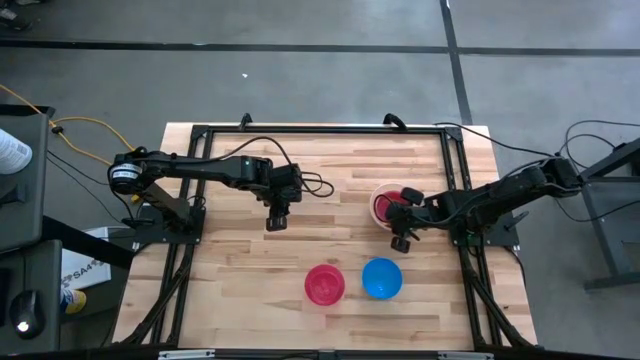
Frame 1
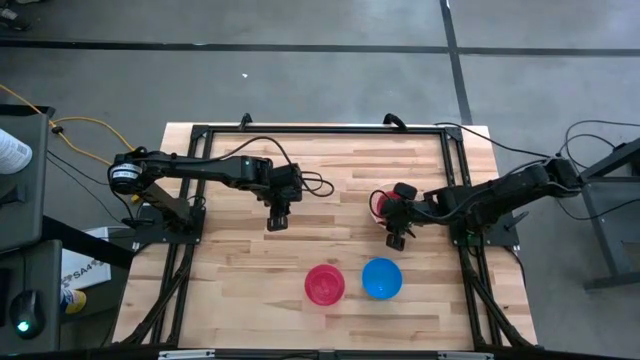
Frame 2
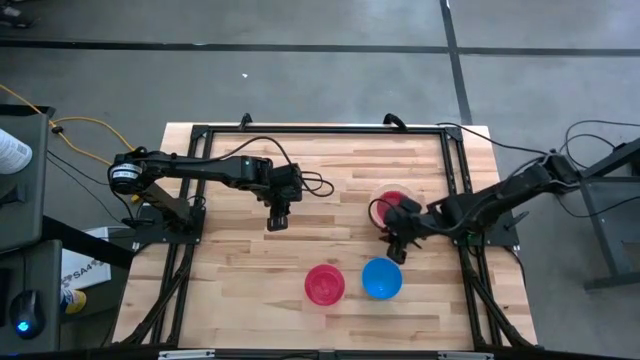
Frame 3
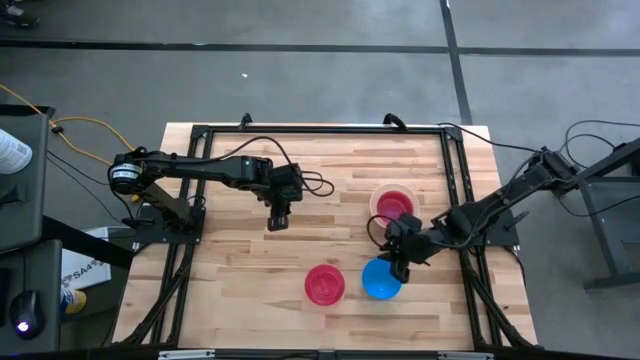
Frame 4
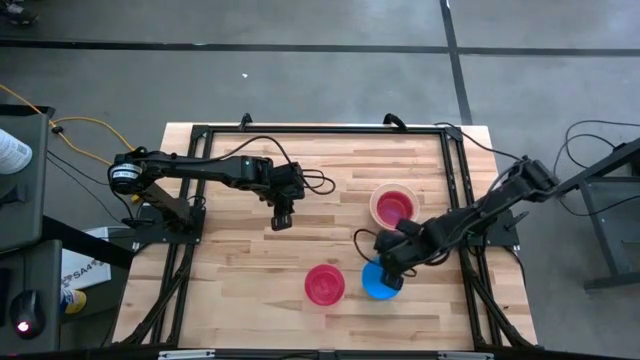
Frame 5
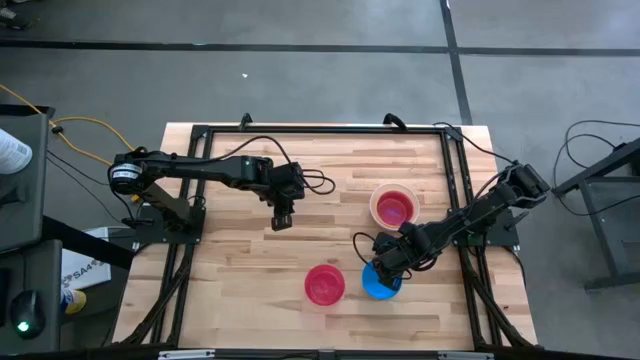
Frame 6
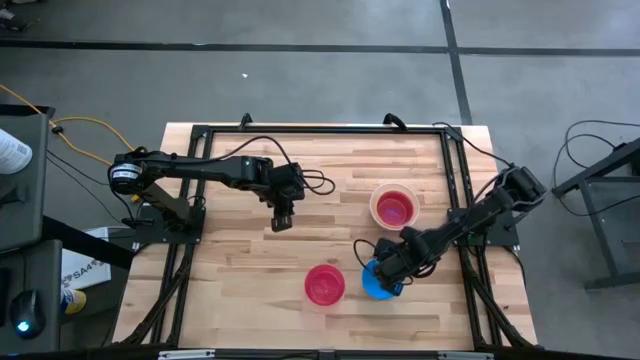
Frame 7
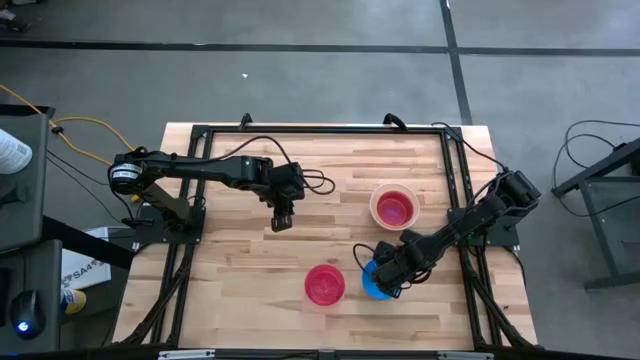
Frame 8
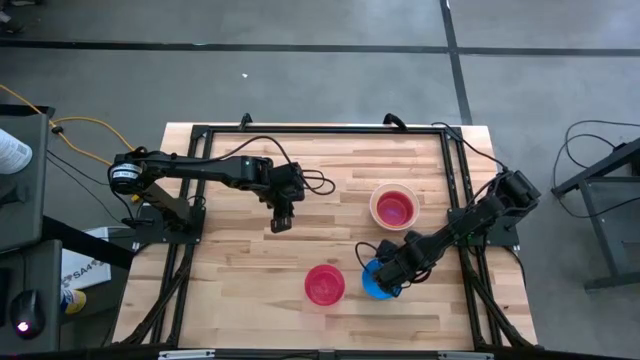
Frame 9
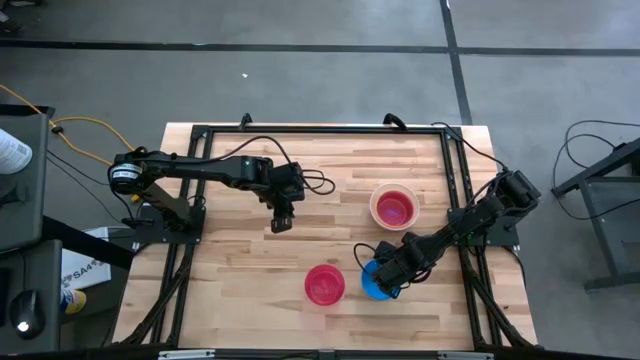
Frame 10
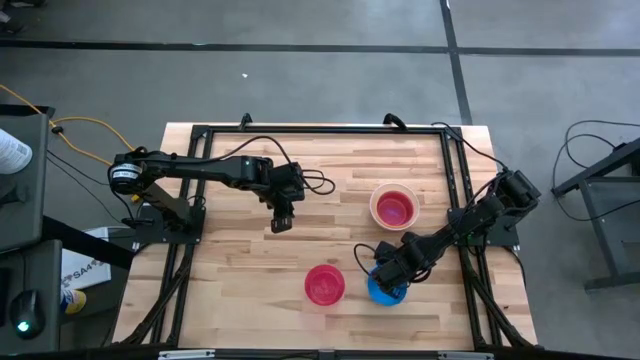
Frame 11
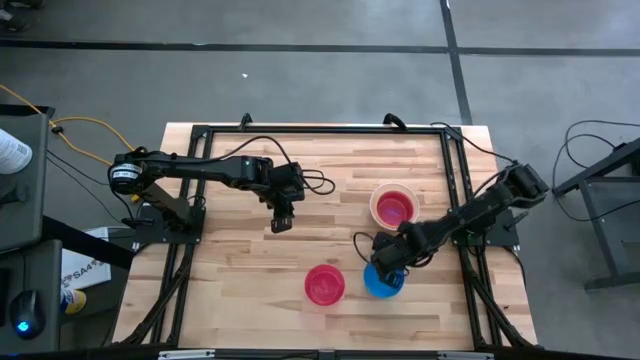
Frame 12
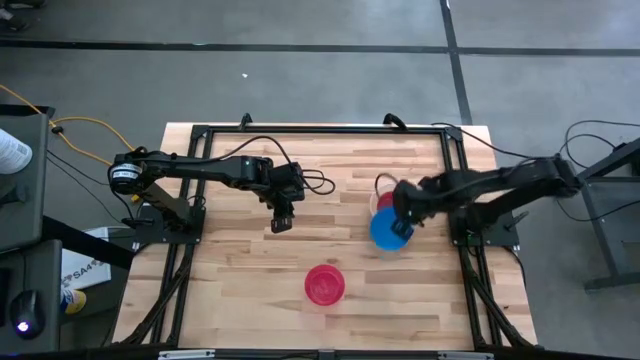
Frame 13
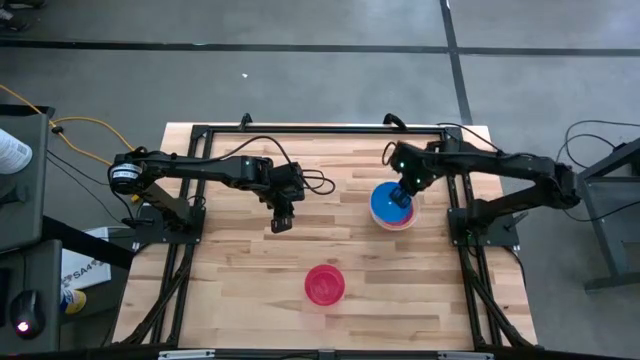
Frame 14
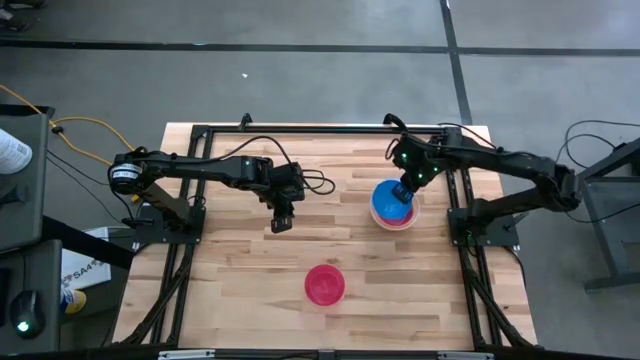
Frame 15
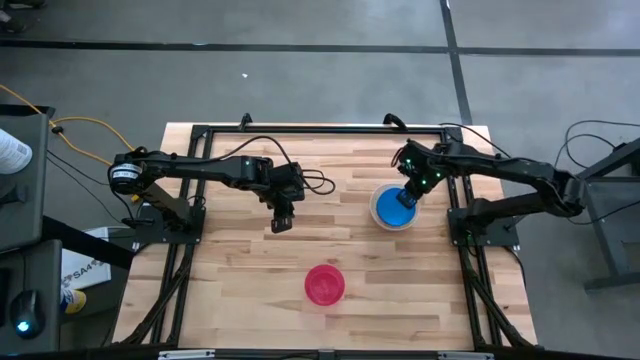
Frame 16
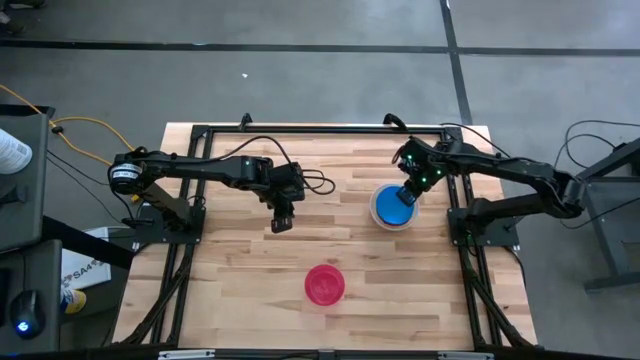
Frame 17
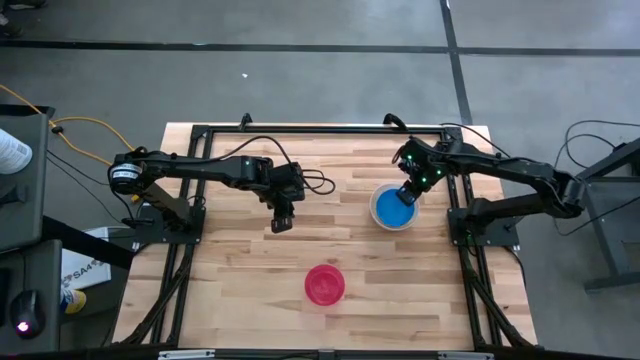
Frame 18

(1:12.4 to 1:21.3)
Stack the blue bowl on top of the violet bowl

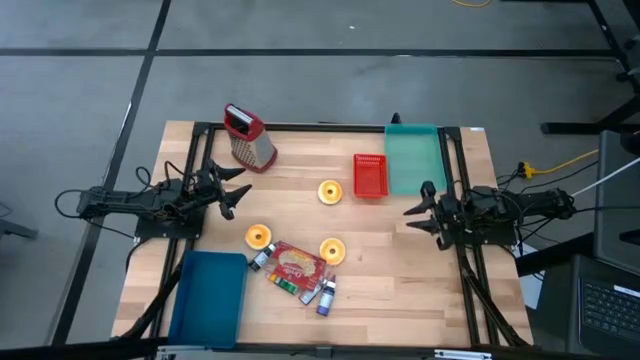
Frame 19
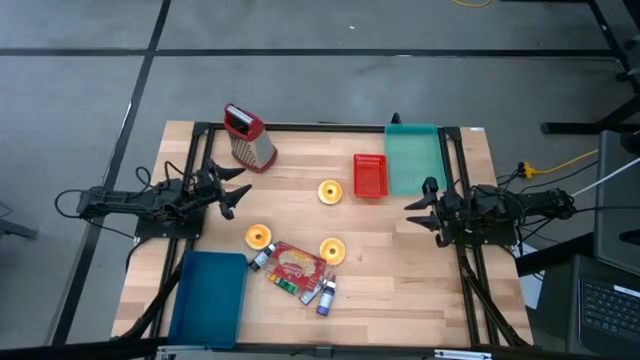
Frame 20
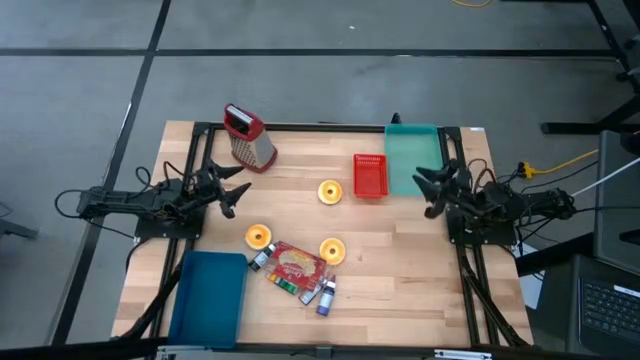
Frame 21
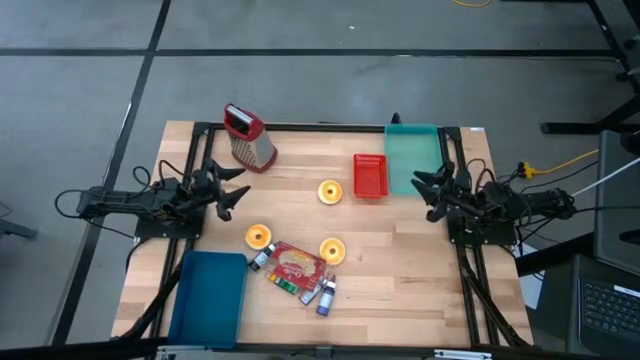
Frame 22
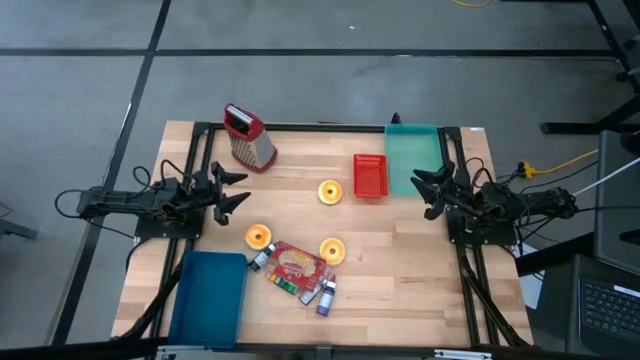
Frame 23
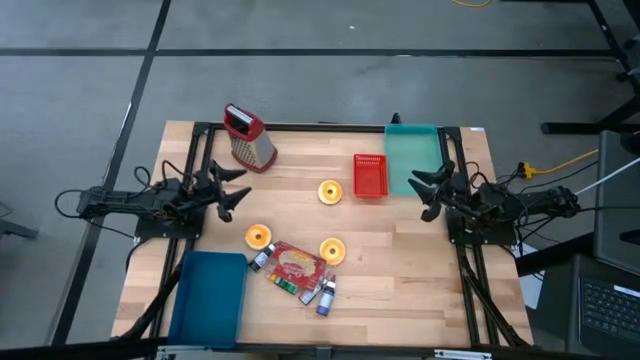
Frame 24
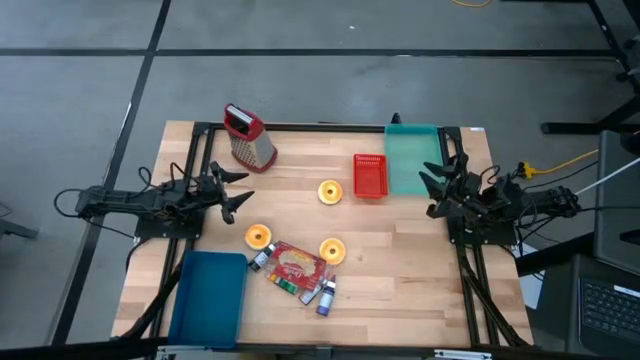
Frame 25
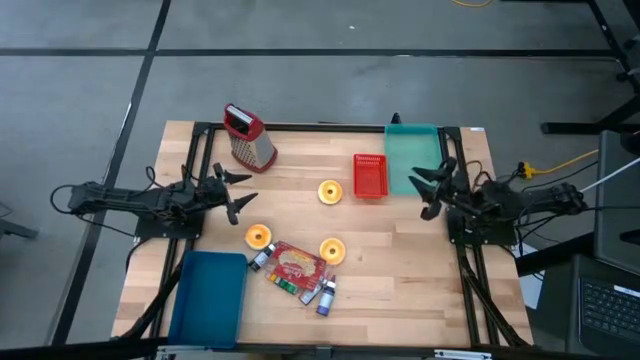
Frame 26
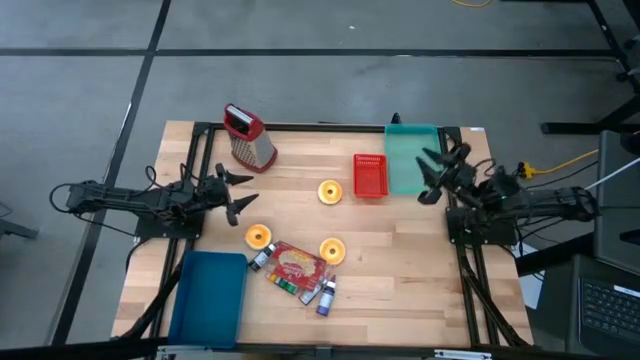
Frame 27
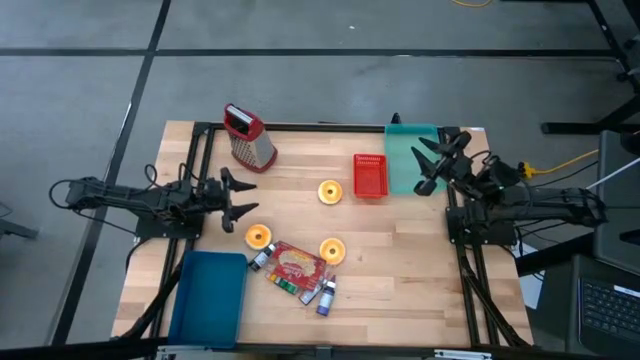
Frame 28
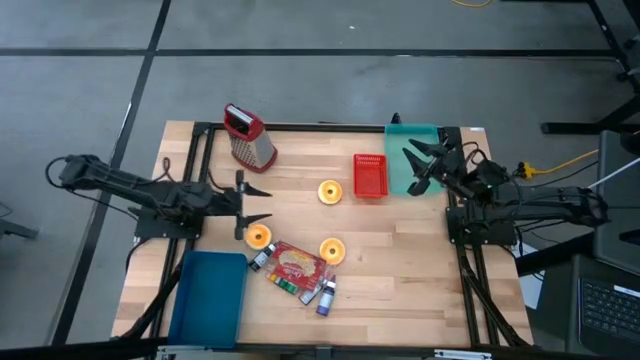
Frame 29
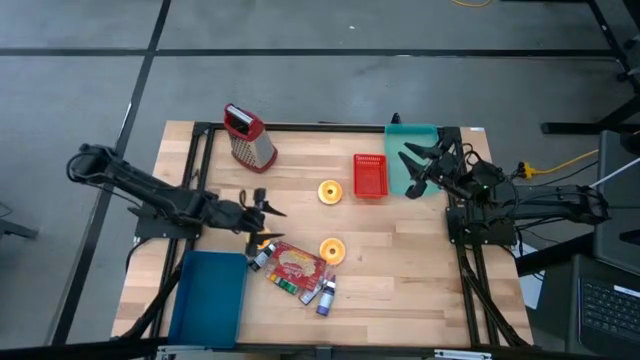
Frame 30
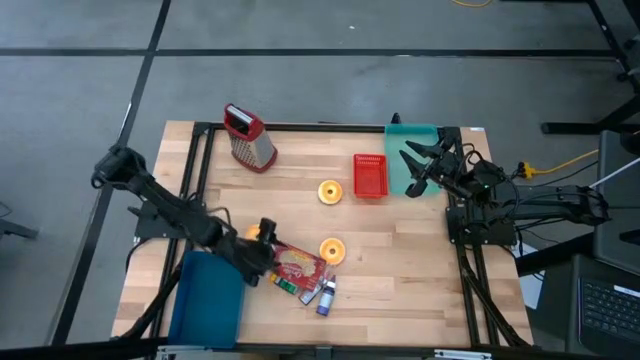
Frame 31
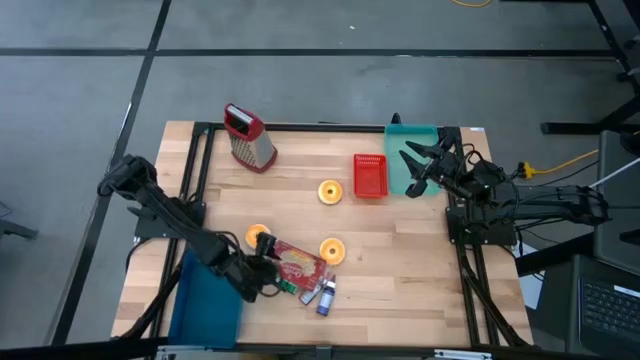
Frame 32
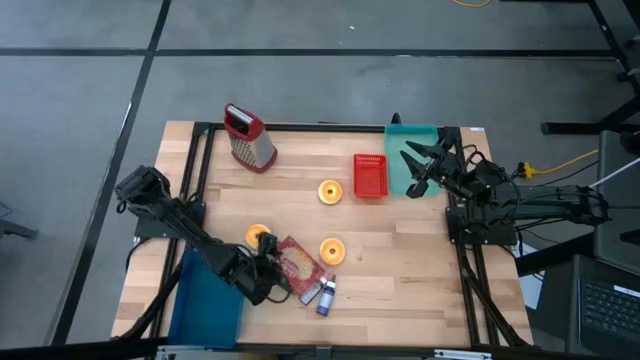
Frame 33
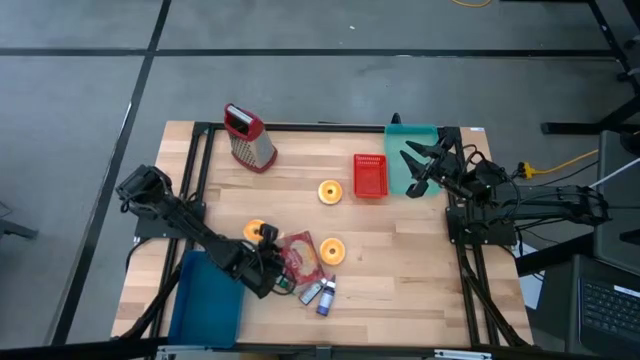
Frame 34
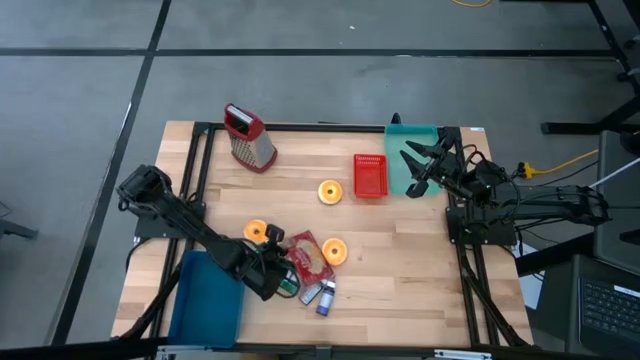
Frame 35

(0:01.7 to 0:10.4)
Put the red popcorn bag into the blue bin

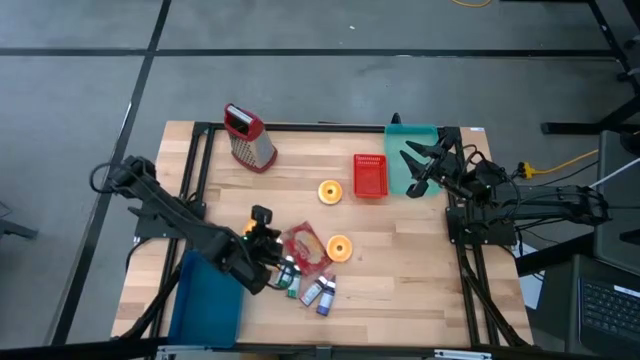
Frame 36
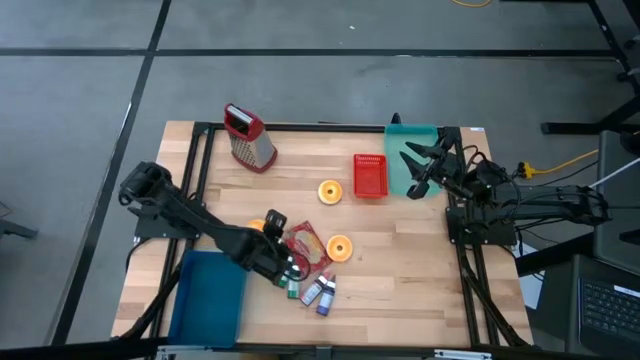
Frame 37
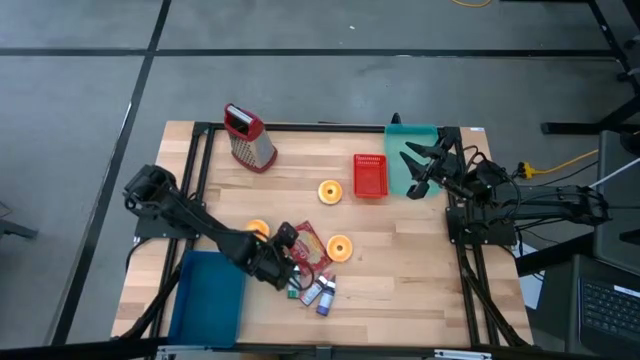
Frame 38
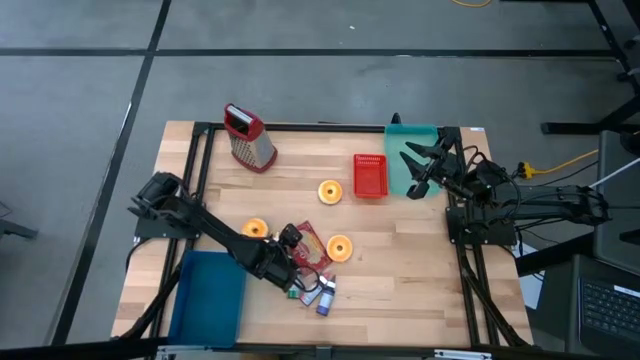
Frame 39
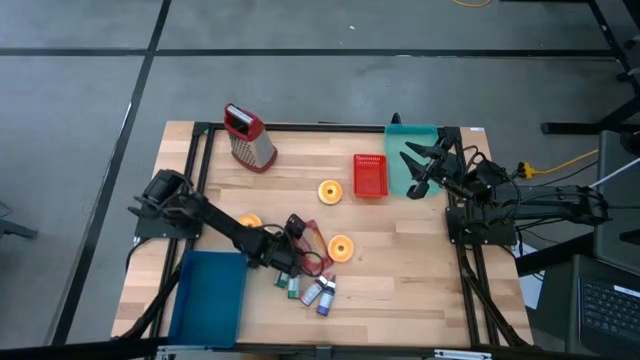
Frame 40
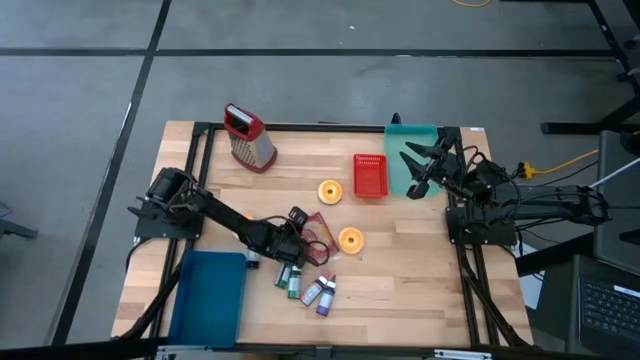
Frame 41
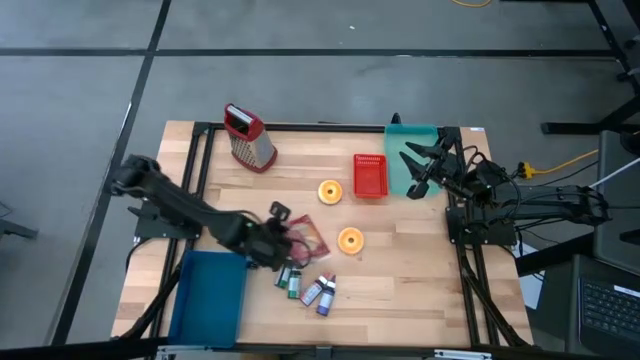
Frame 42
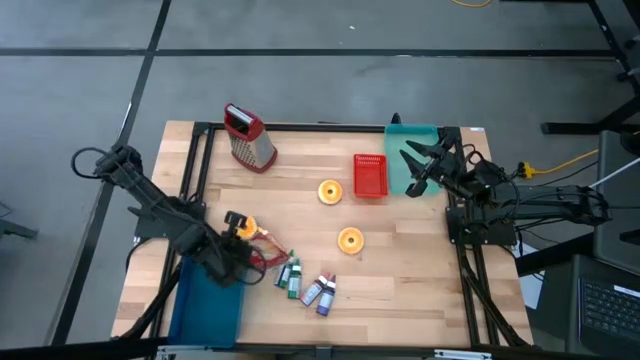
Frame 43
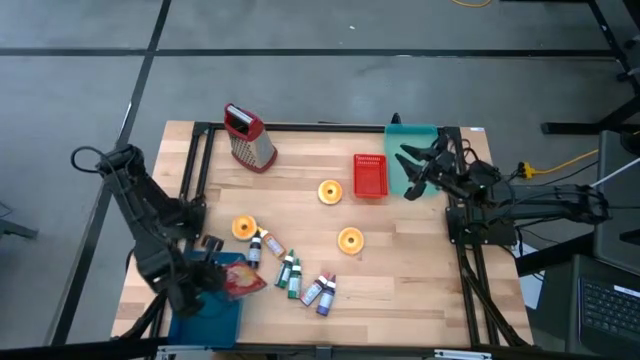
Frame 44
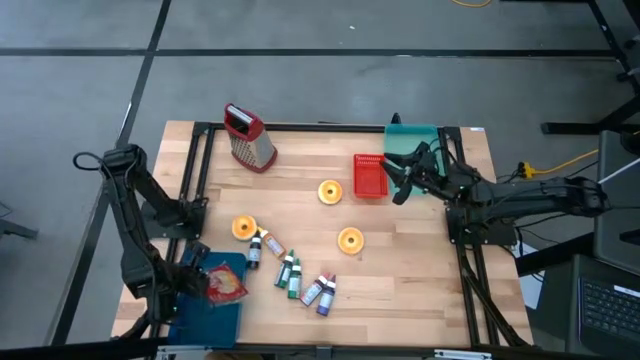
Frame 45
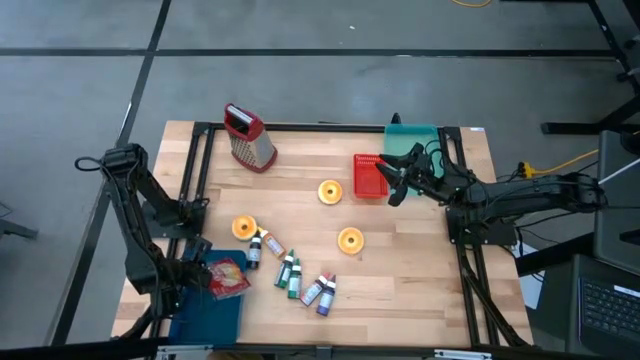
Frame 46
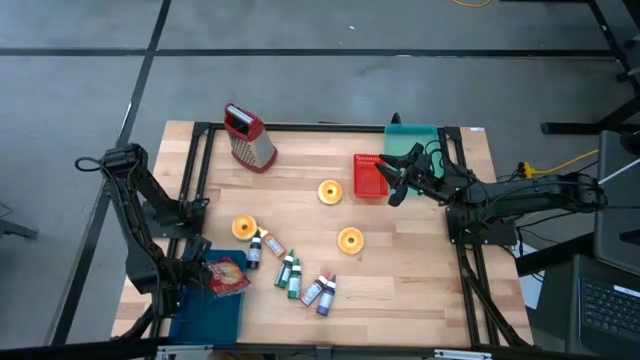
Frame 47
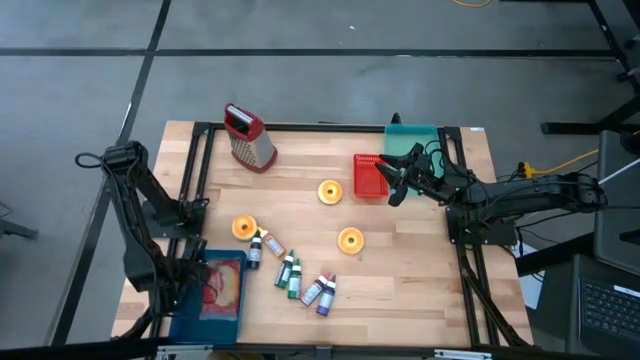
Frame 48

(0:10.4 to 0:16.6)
Put the popcorn bag into the blue bin
